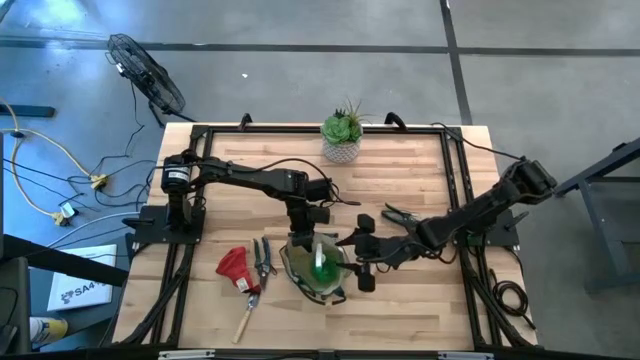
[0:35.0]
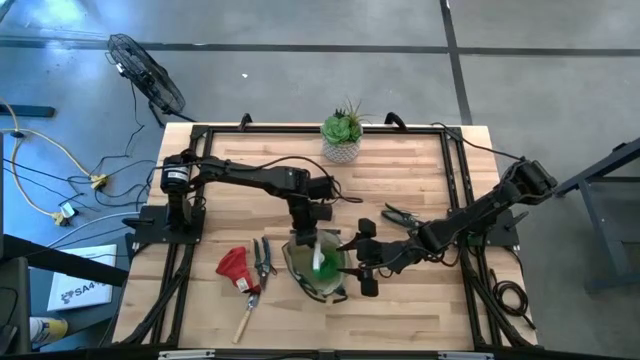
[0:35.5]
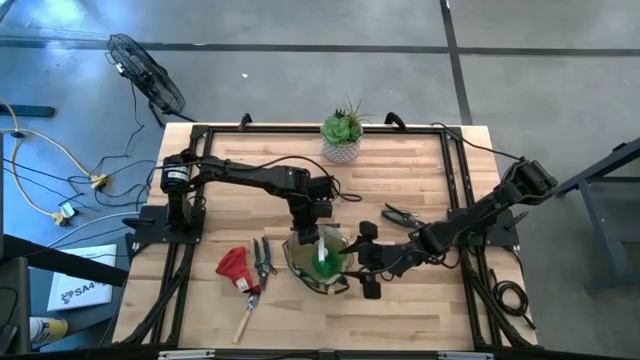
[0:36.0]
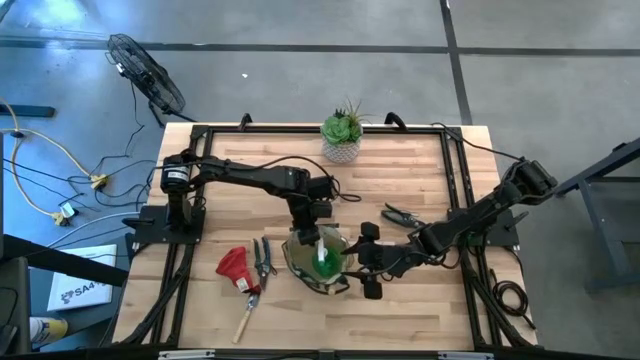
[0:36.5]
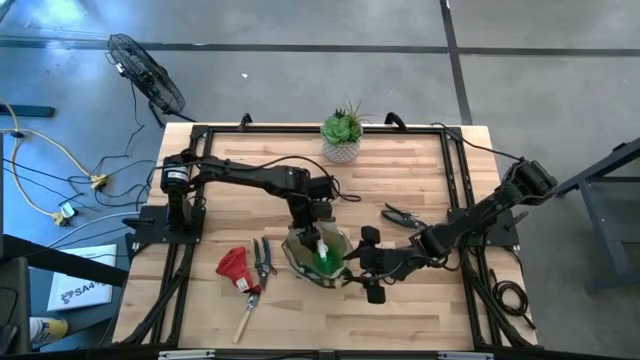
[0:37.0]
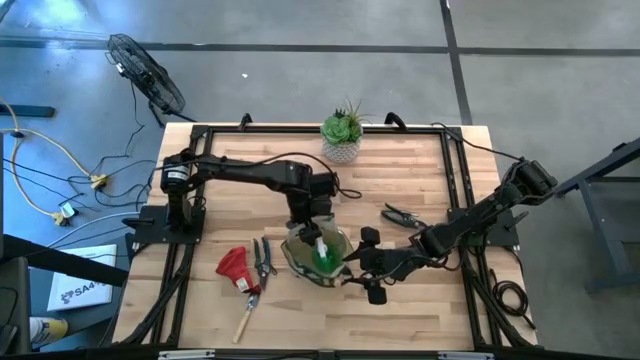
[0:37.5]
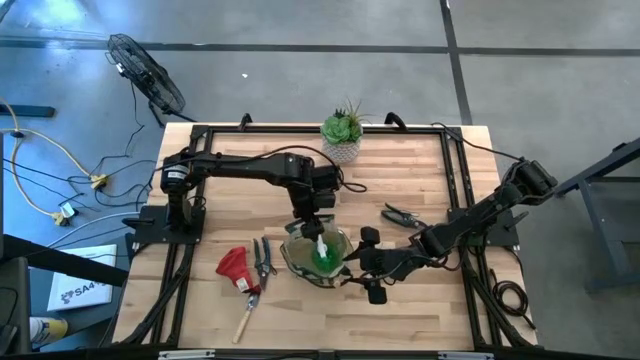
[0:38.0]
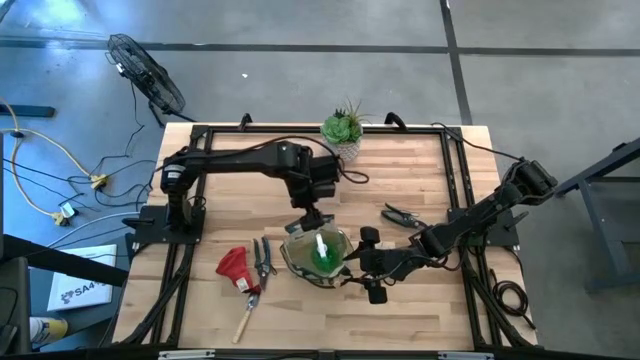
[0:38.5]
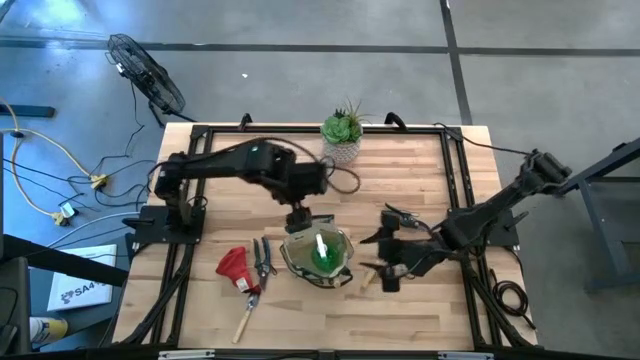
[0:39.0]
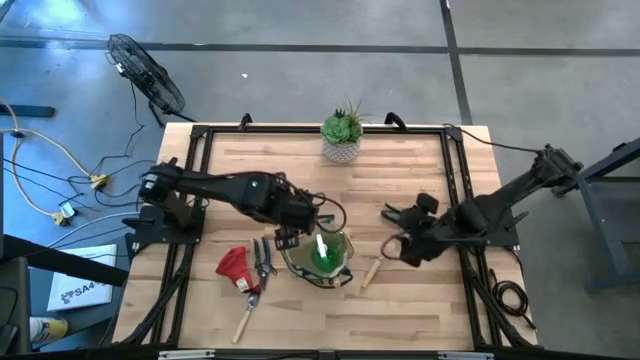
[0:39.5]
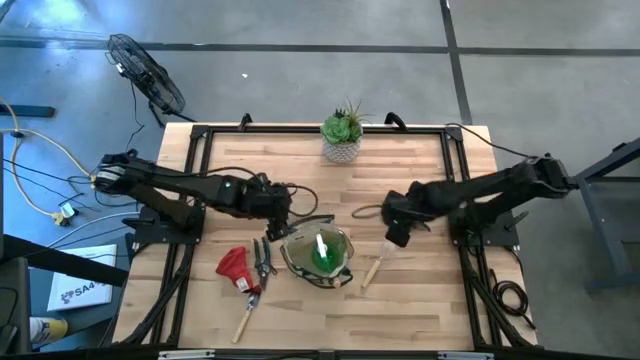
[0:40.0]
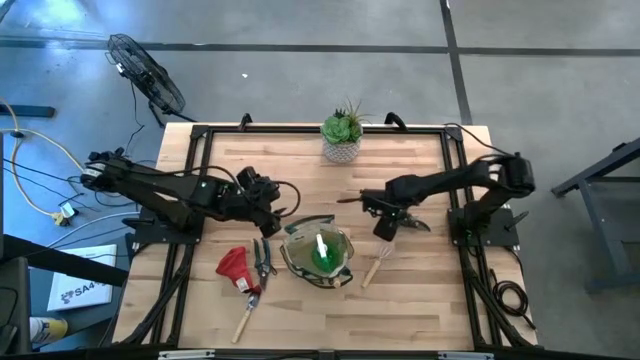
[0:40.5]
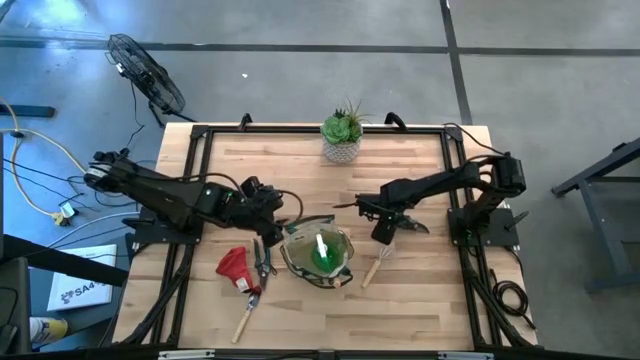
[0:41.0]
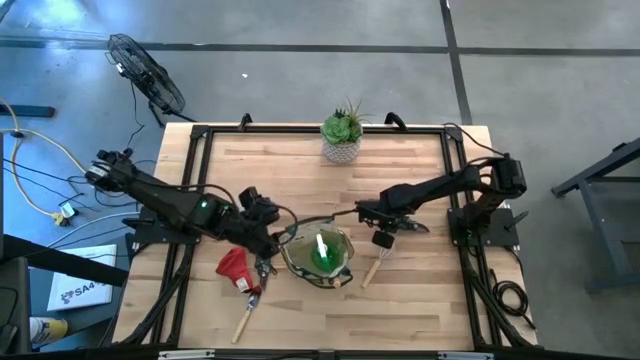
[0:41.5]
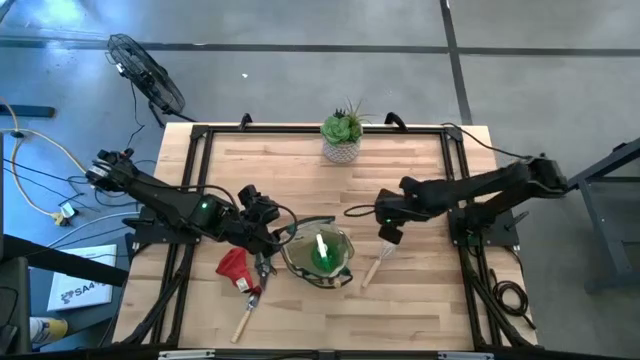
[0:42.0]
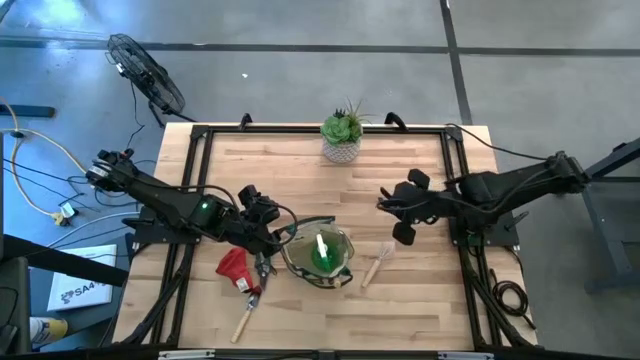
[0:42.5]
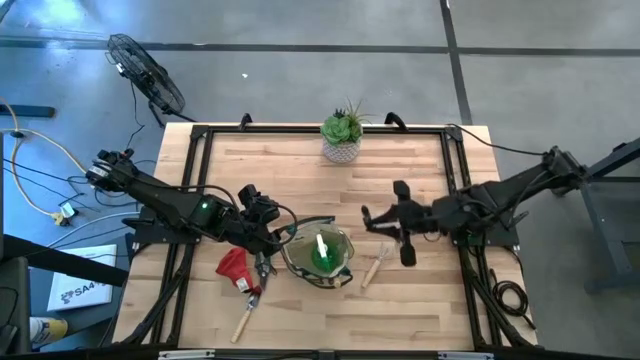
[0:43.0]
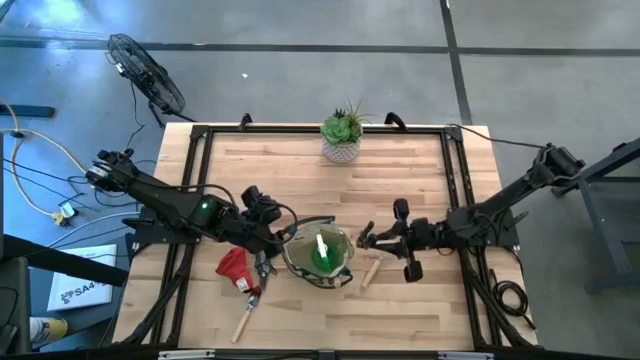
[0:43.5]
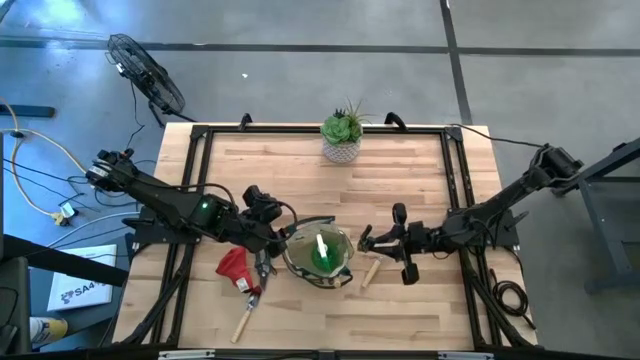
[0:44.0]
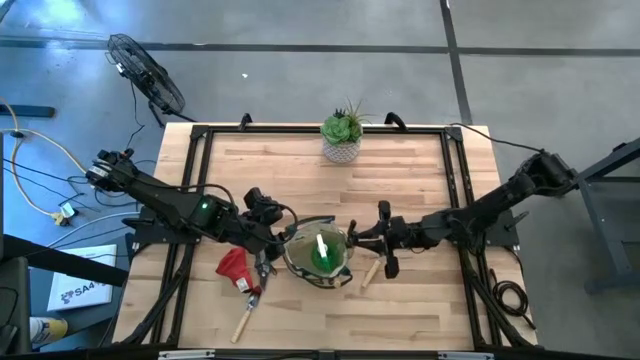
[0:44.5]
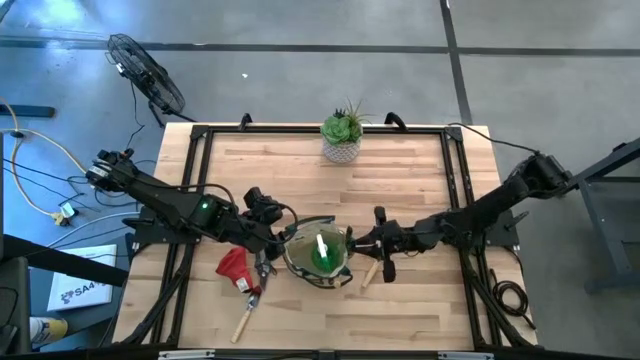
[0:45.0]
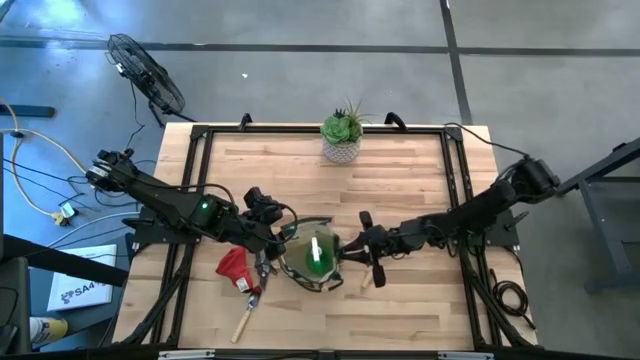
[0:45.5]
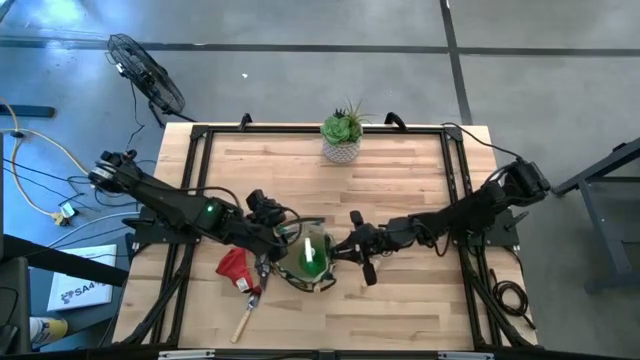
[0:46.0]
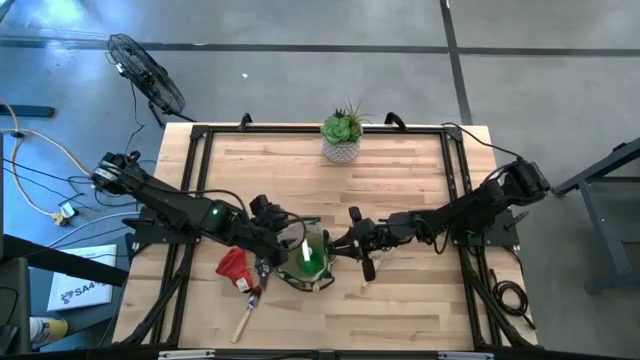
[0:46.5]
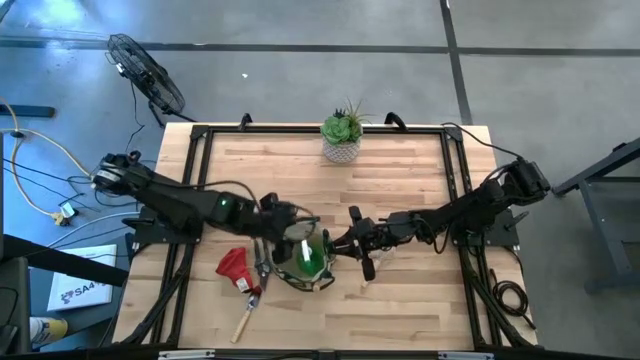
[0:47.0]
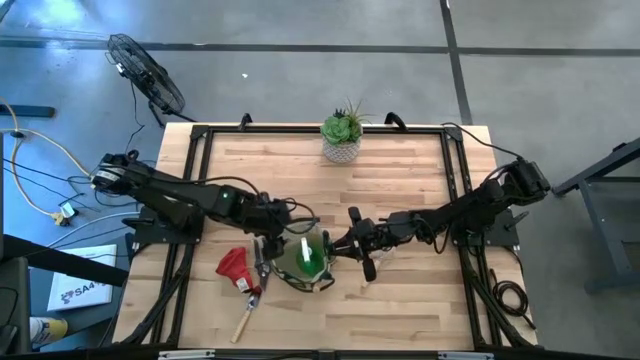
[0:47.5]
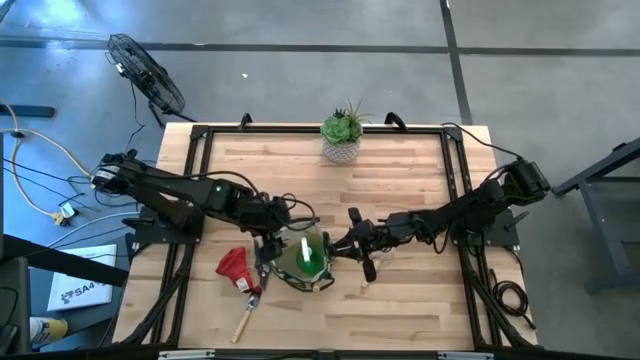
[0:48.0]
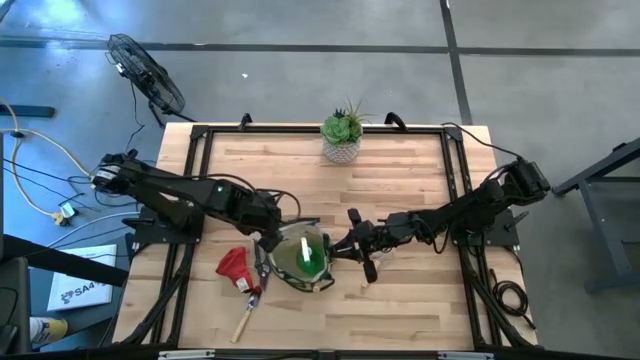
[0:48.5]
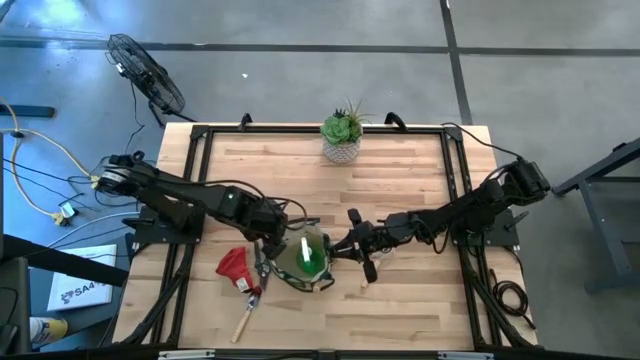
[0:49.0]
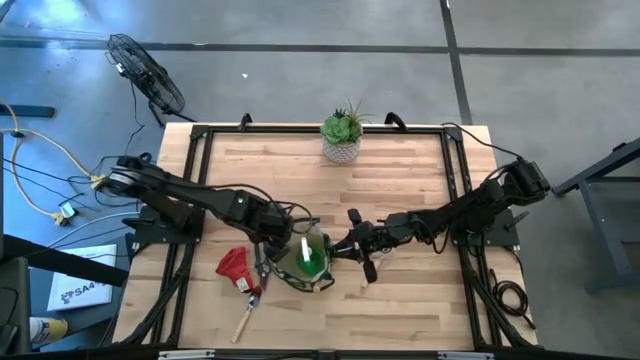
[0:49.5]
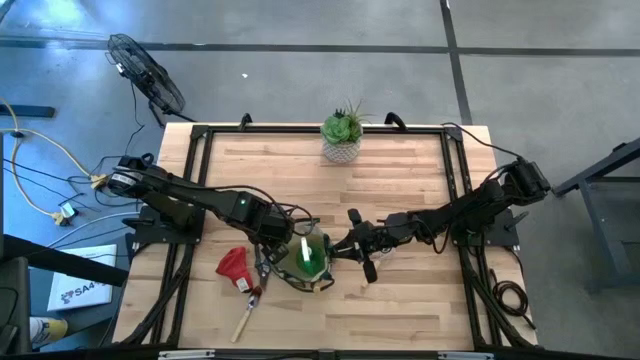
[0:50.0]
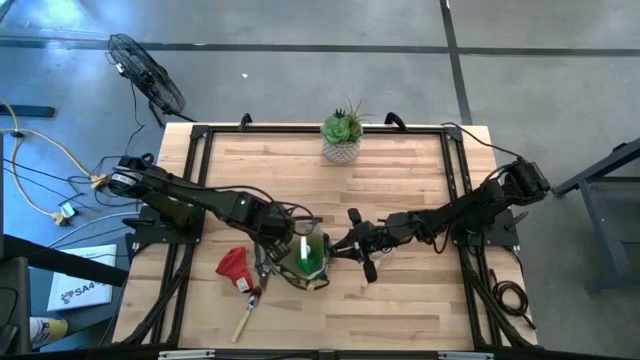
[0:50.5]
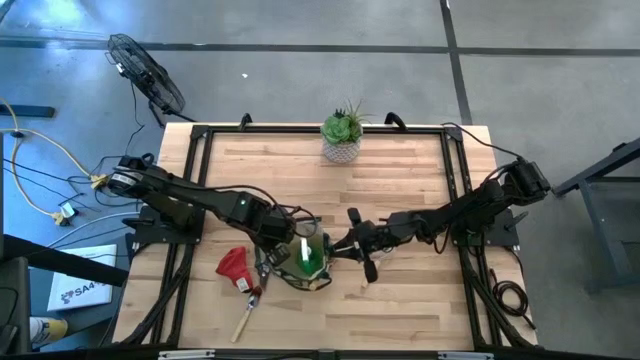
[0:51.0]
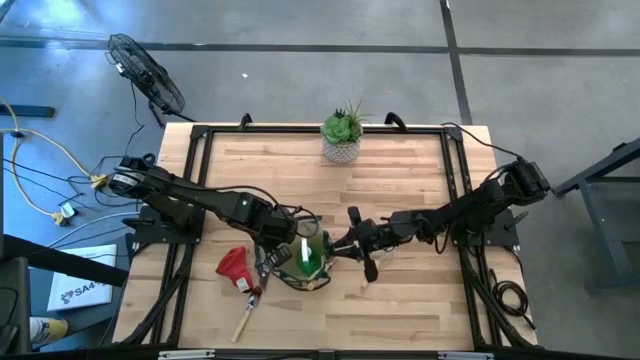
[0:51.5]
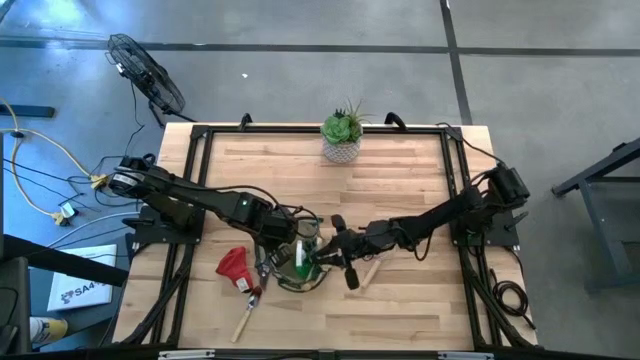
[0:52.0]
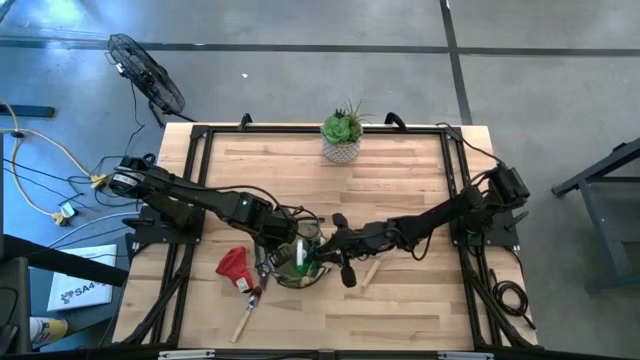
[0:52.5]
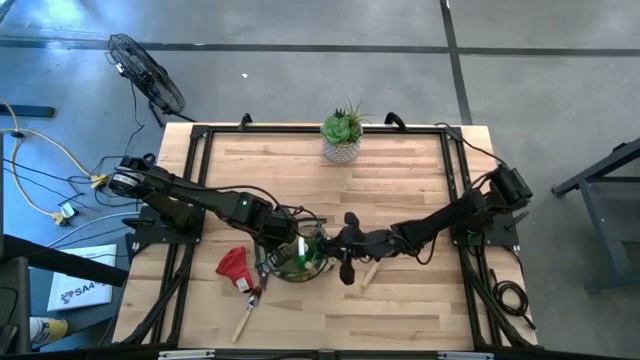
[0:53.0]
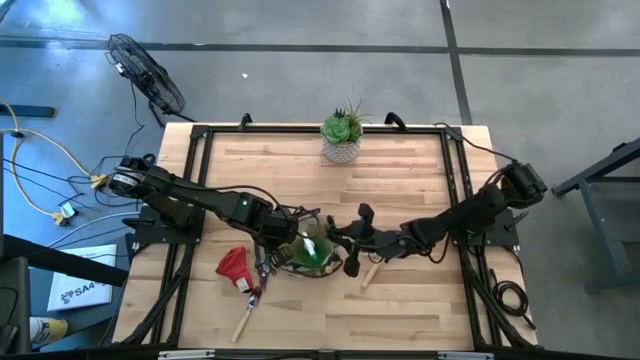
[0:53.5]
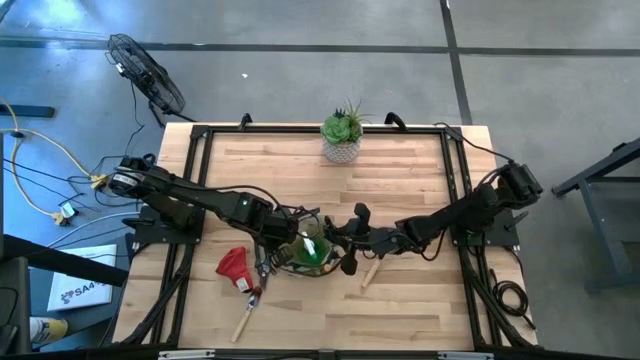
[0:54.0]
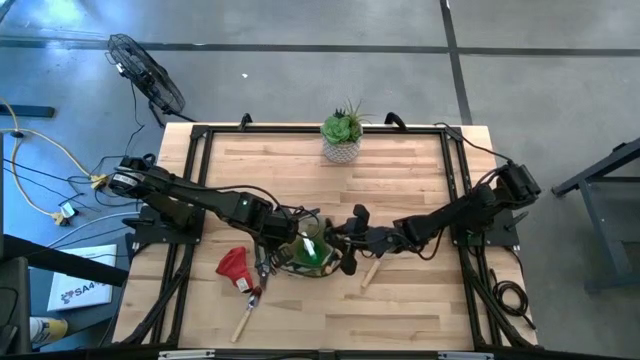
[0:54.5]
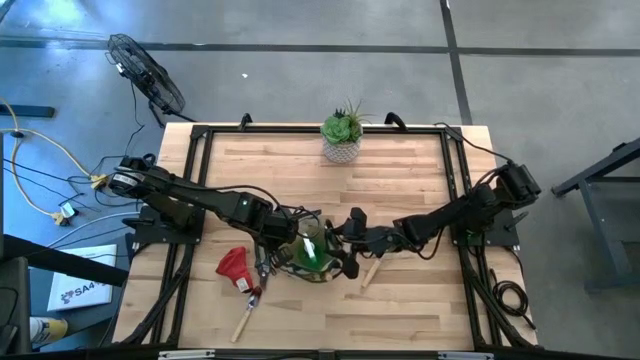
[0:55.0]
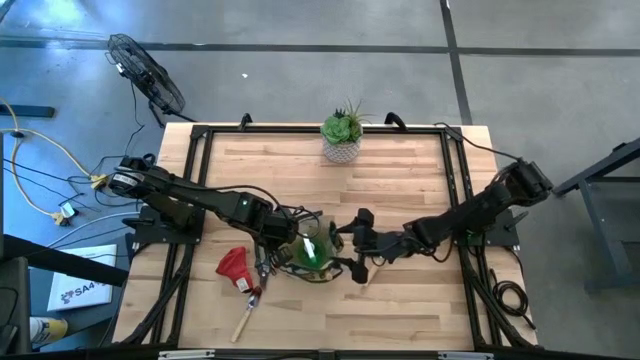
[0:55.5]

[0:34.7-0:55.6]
Task: Pick & Place Garden tools in Gardening bag
Put the right shear scissors into the gardening bag
